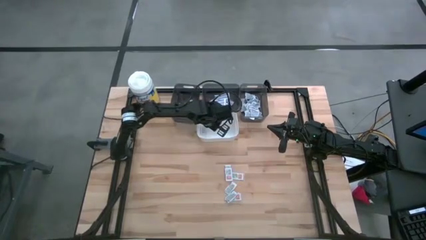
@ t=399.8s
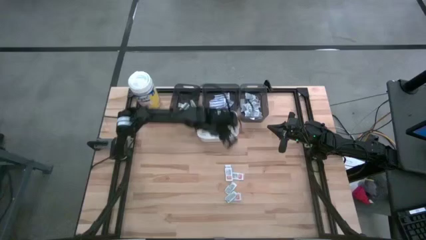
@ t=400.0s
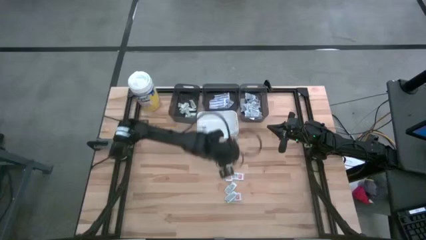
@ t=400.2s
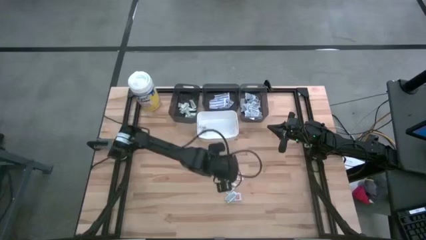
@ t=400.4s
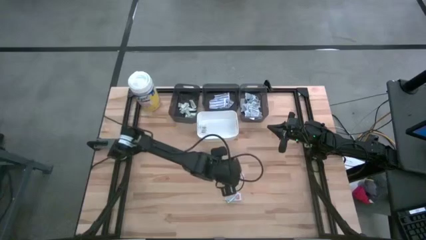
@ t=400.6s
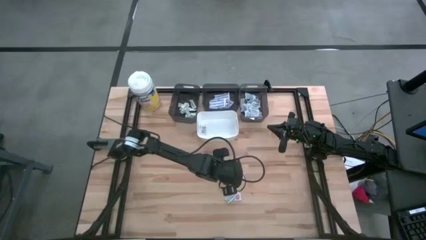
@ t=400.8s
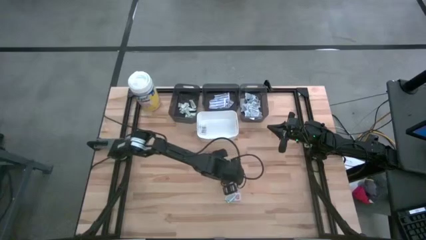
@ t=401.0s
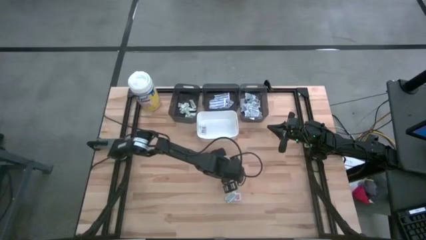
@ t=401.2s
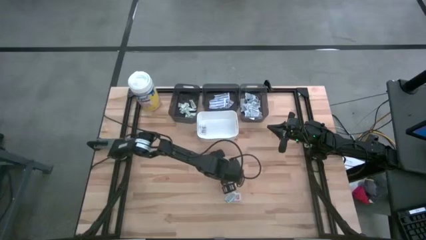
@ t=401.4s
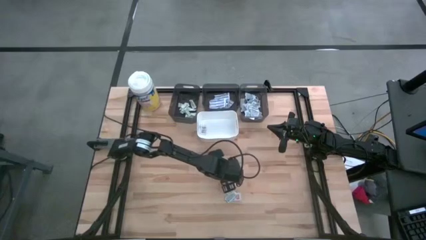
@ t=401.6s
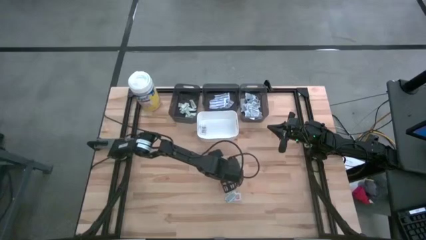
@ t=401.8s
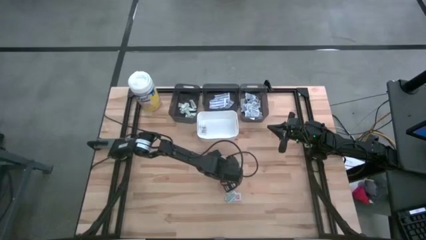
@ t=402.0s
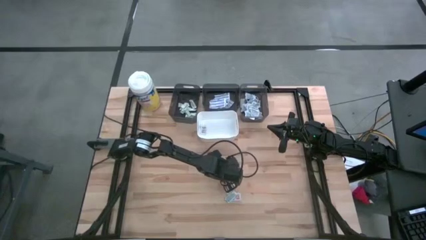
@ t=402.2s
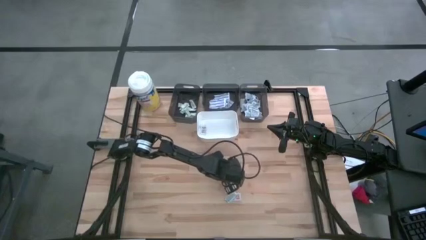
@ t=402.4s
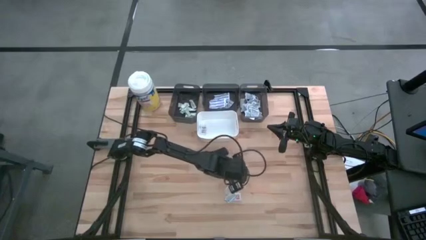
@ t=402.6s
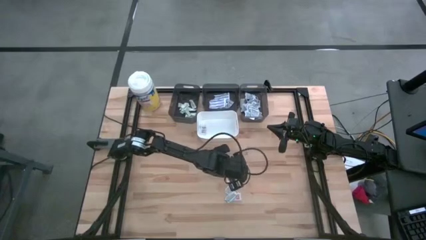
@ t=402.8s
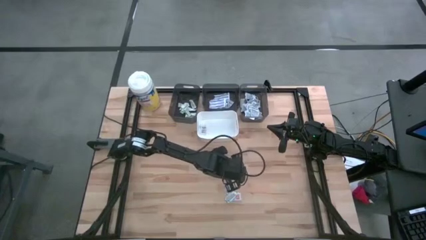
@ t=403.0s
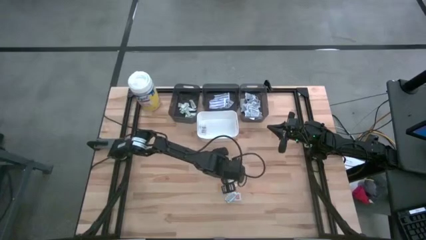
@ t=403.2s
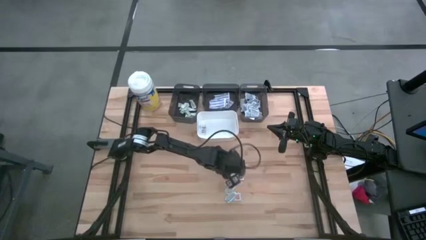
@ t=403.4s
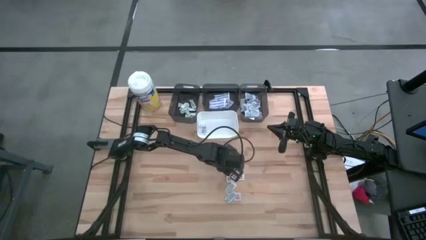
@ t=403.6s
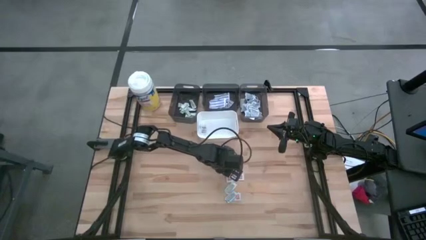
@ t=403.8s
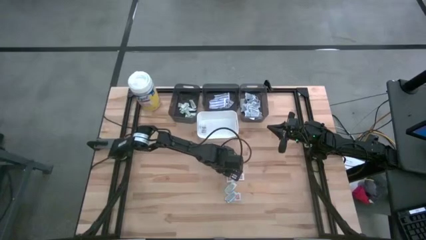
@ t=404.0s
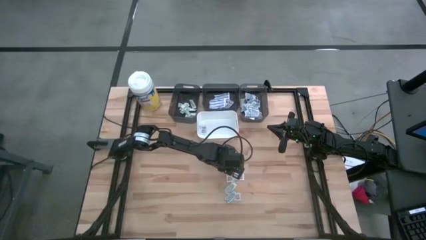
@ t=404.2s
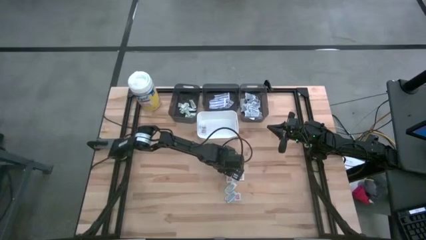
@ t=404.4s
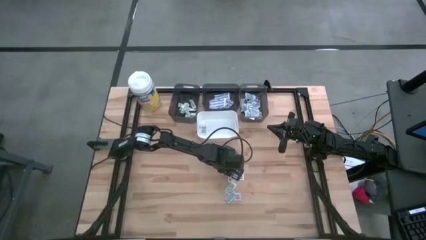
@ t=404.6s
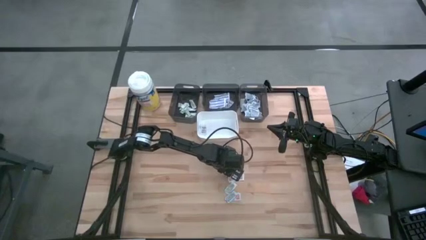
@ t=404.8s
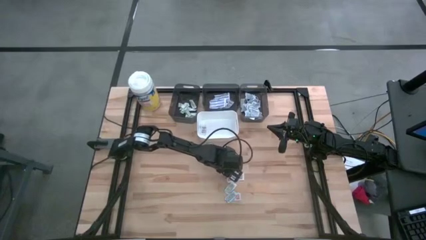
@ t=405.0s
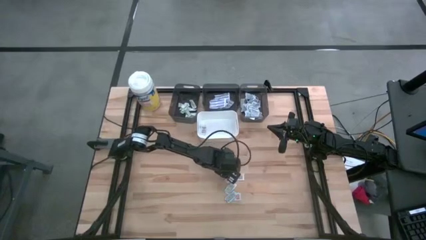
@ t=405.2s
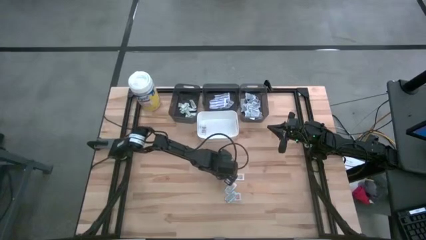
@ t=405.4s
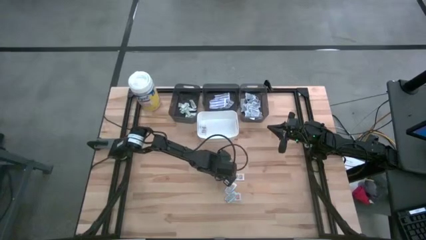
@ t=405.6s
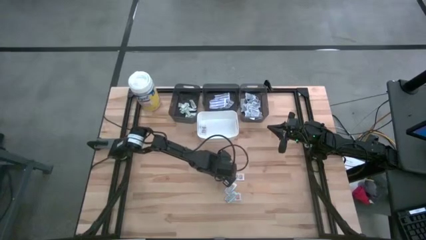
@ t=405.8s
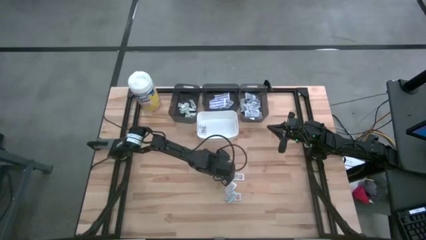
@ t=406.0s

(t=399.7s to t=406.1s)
Task: Pick & Place First Aid Supplies
Put the orange ointment pack into the white bin

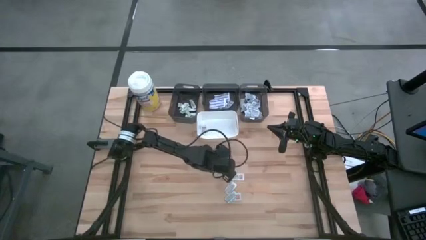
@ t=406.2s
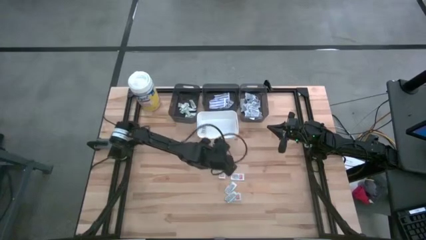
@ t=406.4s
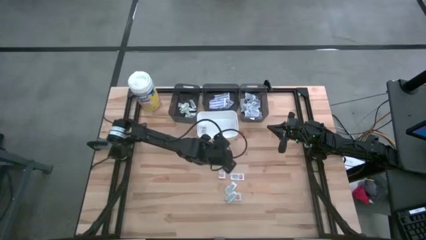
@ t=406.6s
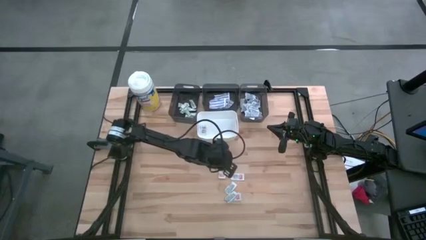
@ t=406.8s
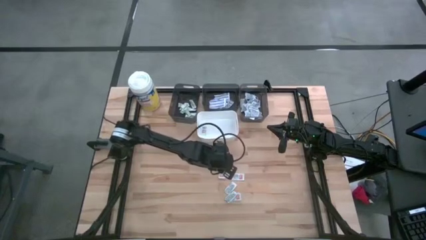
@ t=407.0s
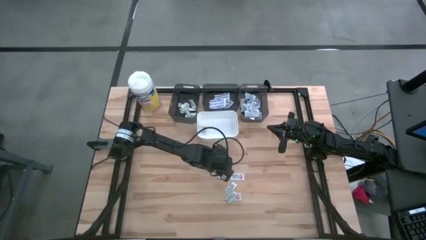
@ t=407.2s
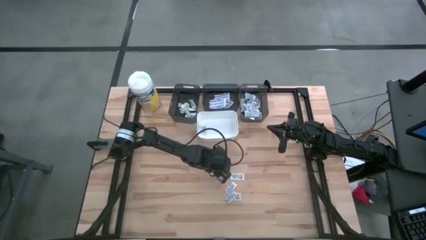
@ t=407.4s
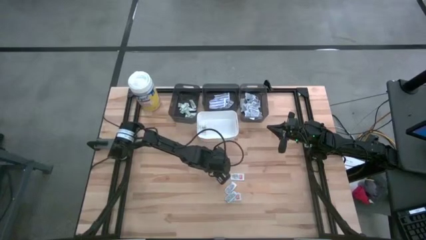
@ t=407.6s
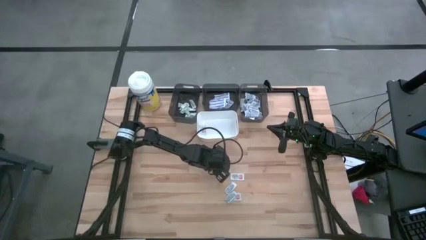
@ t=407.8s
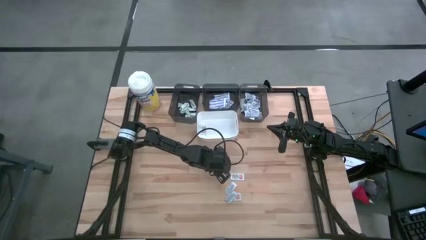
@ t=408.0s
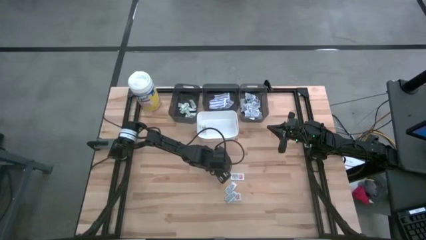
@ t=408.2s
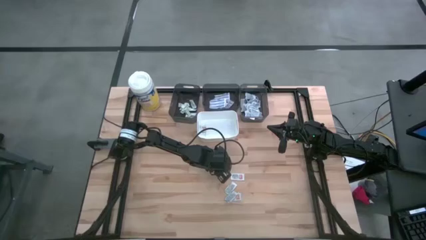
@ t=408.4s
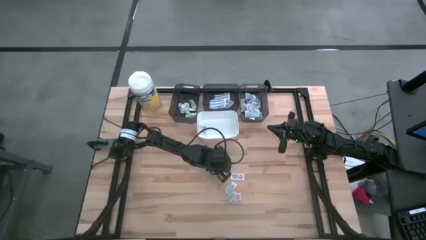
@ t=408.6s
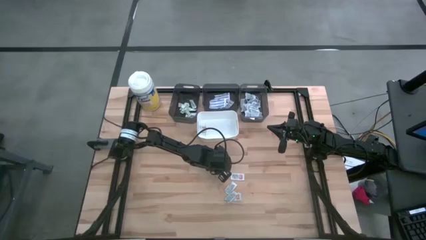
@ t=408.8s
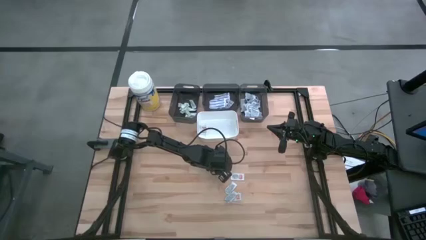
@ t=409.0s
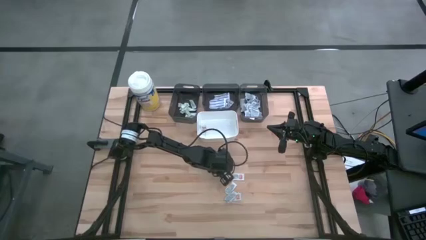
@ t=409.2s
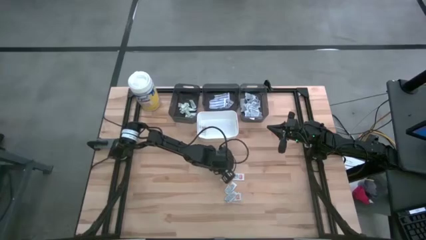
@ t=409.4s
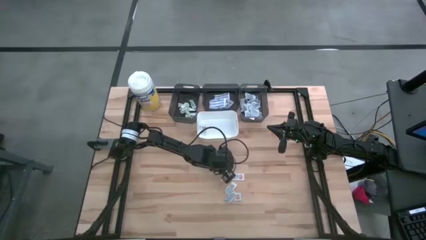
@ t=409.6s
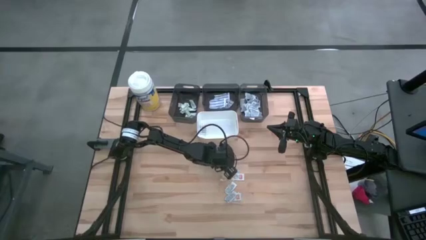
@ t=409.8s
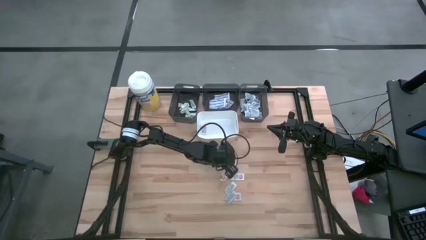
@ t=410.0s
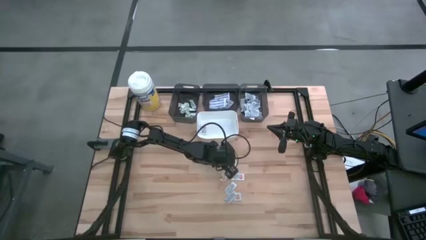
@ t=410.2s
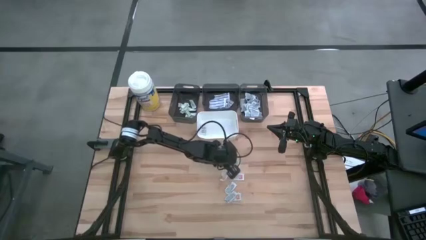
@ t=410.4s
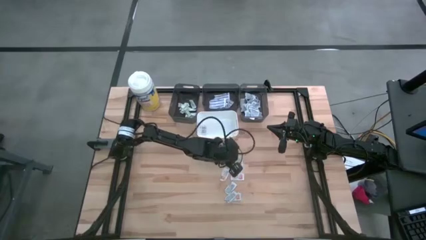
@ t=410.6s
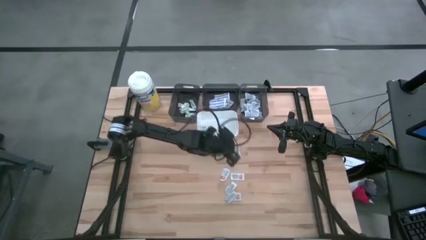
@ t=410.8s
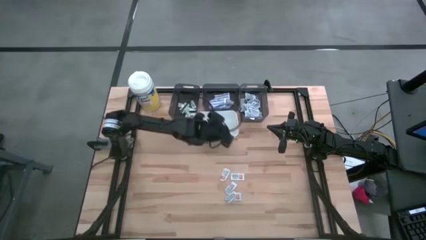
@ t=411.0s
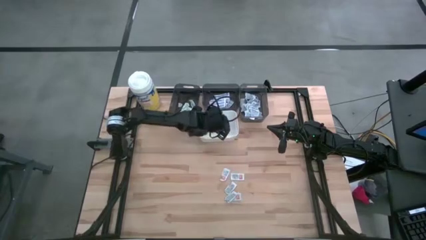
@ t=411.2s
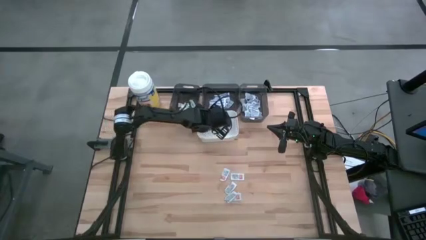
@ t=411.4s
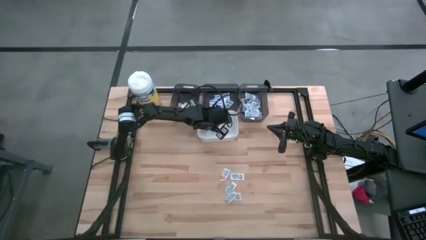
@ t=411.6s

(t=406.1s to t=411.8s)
Put the orange ointment pack into the white bin

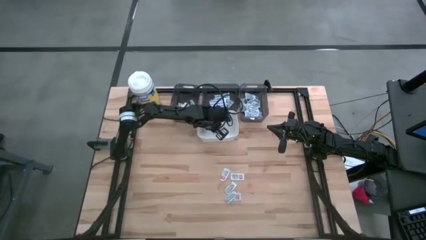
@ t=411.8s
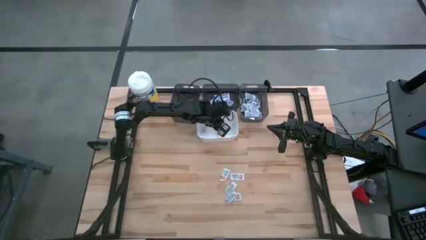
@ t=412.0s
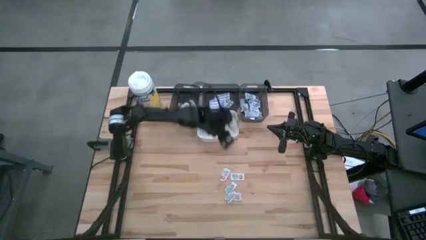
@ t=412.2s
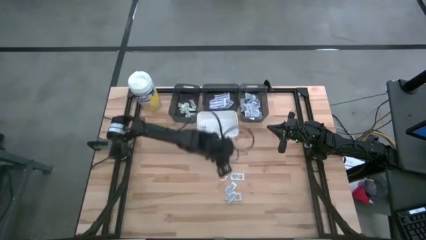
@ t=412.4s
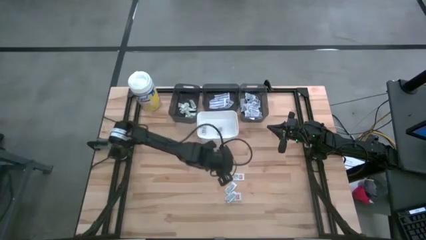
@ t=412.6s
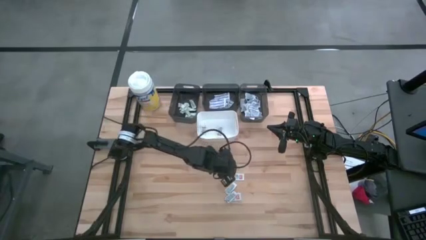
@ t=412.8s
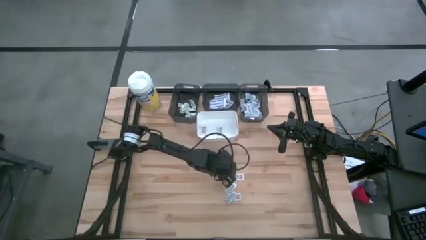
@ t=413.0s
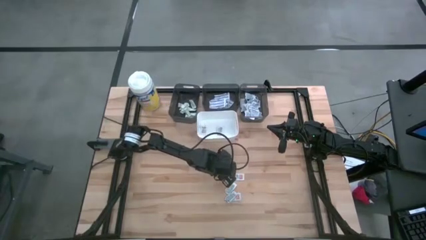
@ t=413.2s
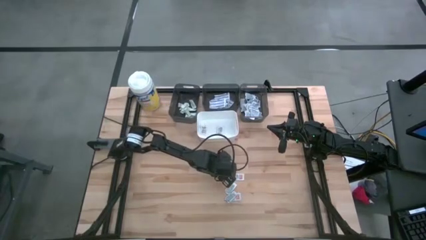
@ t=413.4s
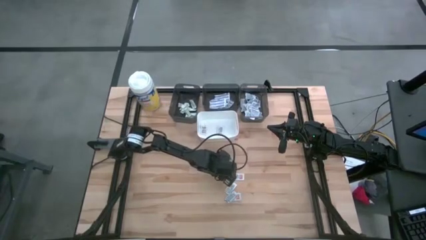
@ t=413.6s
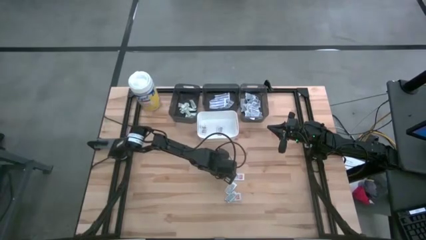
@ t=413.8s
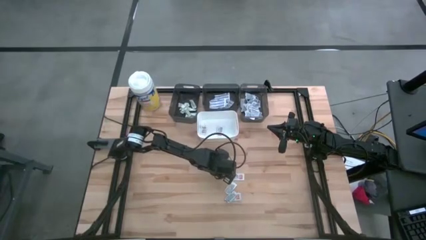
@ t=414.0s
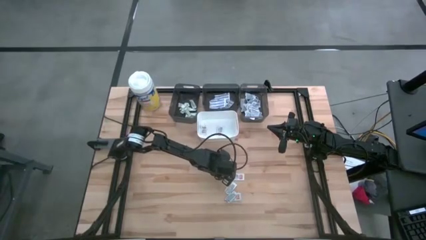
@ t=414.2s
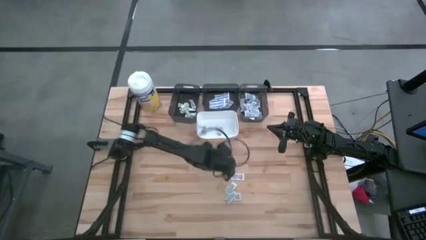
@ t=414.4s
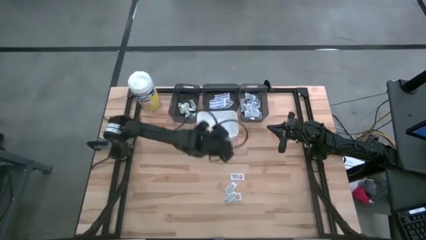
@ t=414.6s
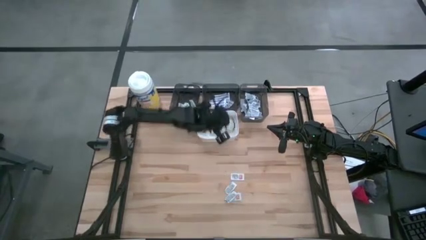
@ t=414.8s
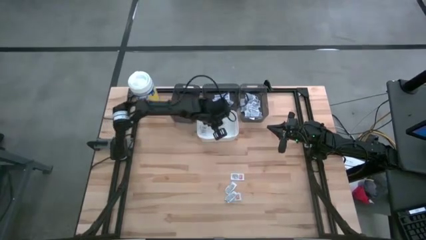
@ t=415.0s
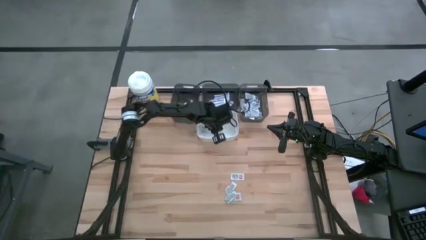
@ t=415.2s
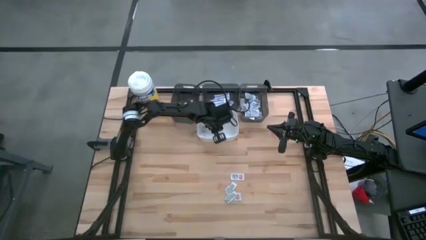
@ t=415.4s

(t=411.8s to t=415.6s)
Put the orange ointment pack into the white bin

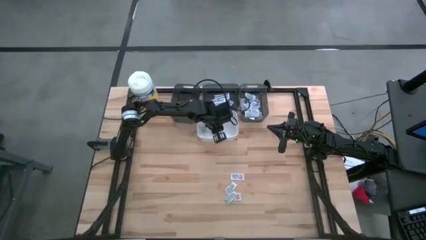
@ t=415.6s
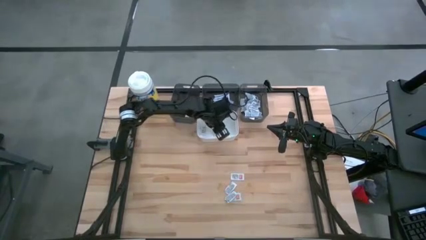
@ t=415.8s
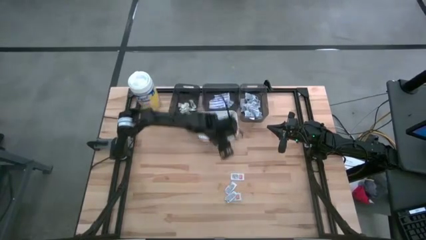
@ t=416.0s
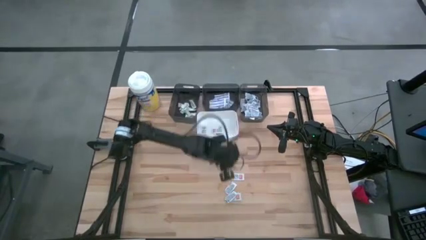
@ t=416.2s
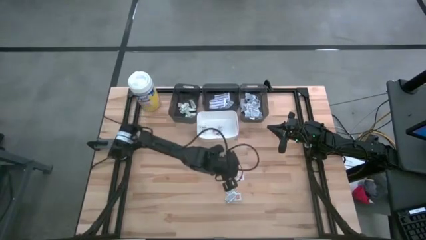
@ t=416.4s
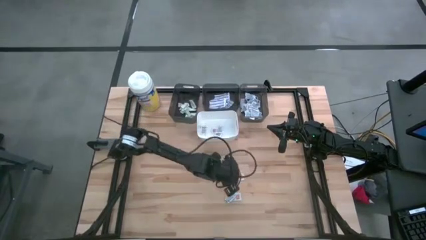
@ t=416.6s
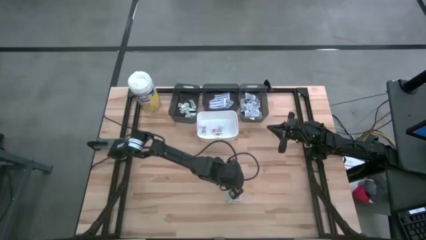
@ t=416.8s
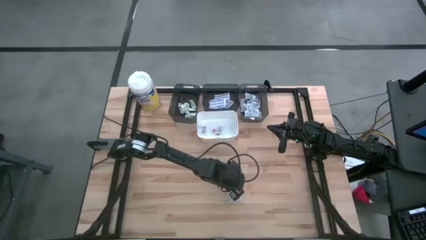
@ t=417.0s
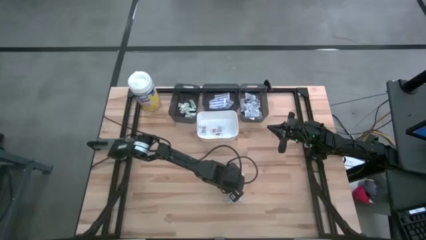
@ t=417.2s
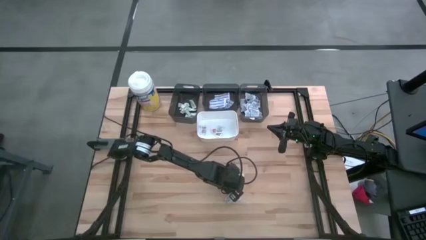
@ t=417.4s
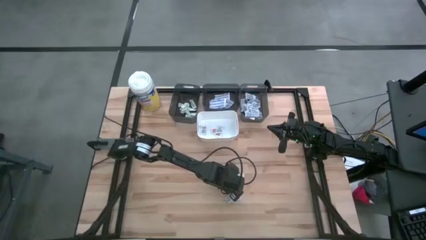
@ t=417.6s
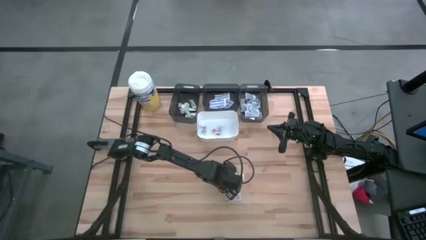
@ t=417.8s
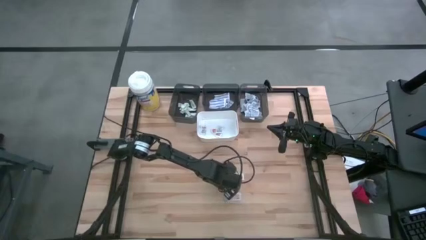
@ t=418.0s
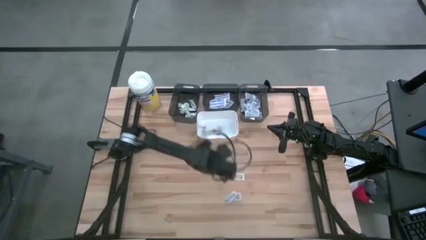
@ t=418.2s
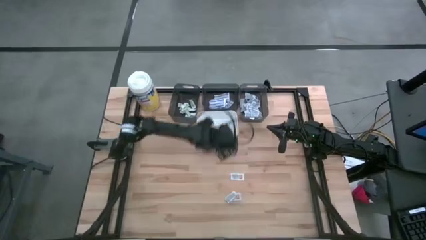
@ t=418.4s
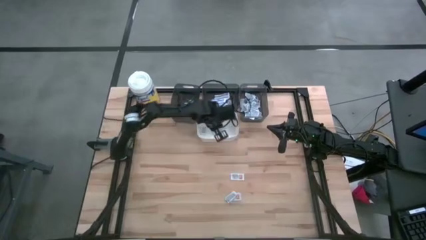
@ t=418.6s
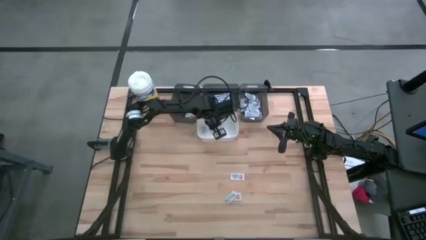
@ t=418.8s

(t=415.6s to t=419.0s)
Put the orange ointment pack into the white bin
